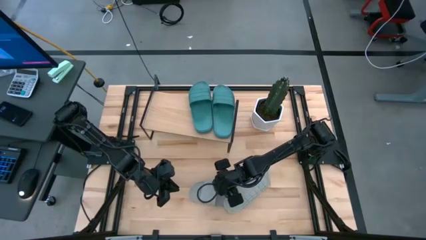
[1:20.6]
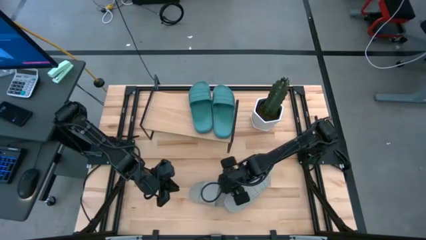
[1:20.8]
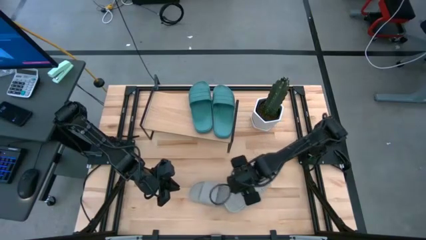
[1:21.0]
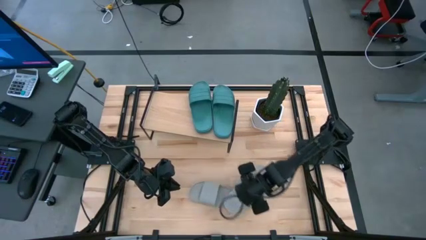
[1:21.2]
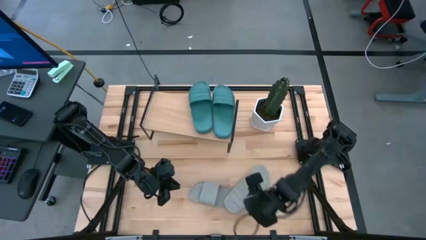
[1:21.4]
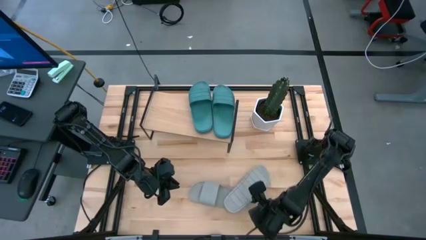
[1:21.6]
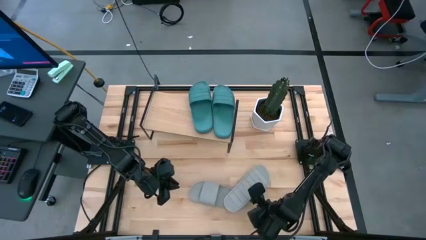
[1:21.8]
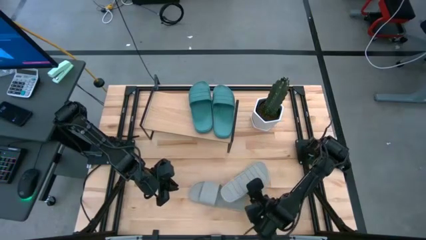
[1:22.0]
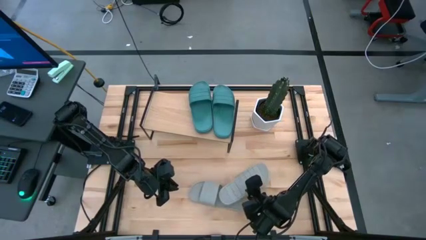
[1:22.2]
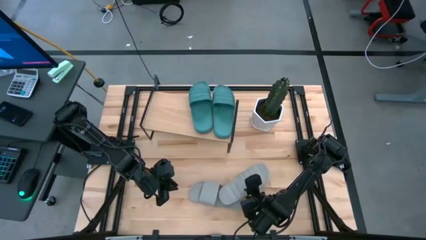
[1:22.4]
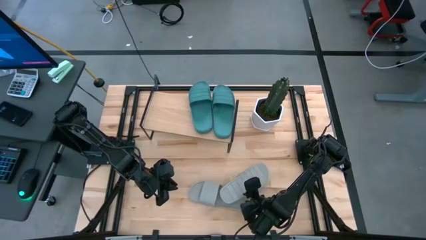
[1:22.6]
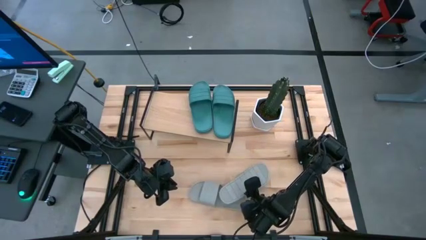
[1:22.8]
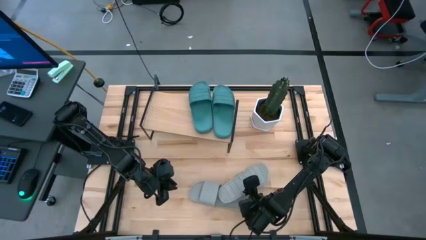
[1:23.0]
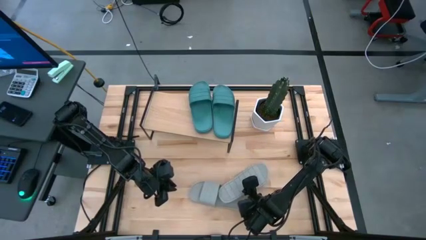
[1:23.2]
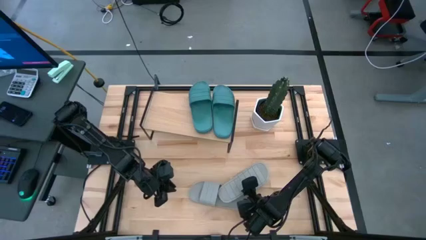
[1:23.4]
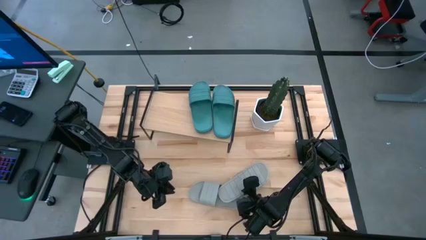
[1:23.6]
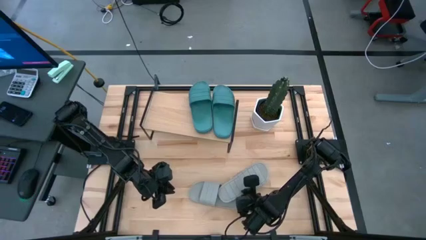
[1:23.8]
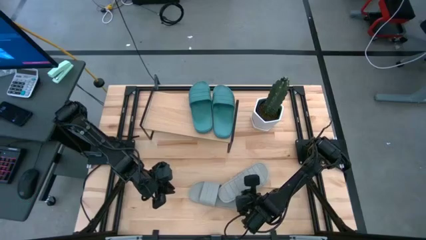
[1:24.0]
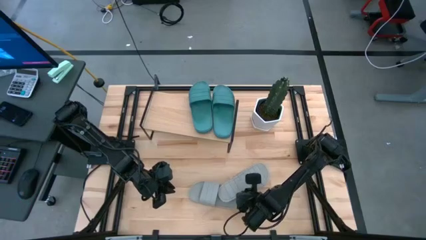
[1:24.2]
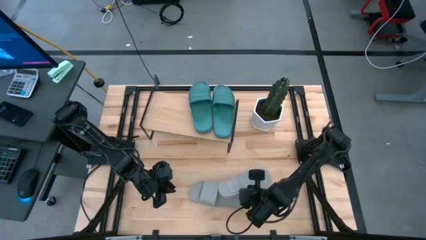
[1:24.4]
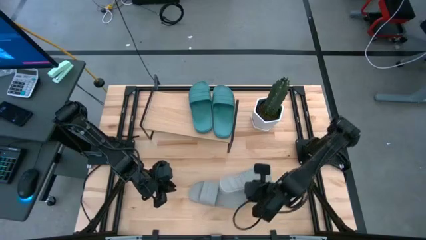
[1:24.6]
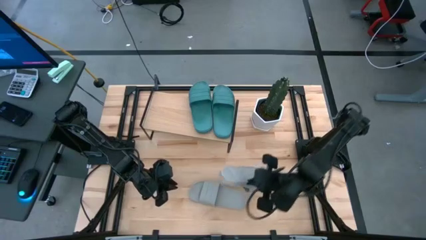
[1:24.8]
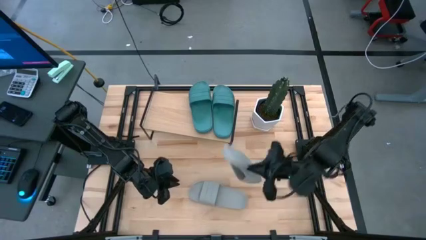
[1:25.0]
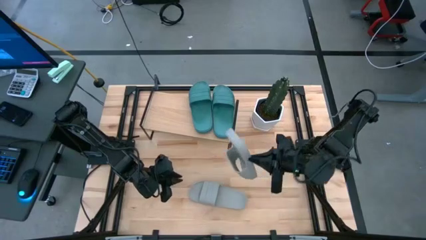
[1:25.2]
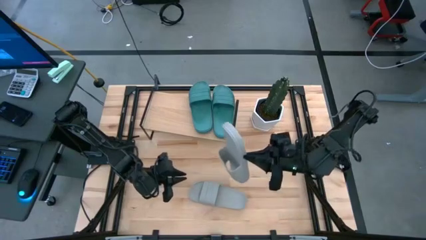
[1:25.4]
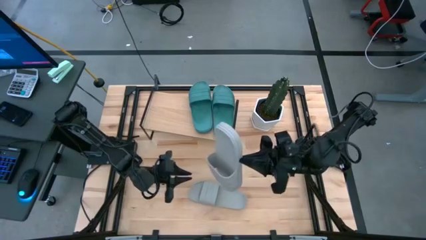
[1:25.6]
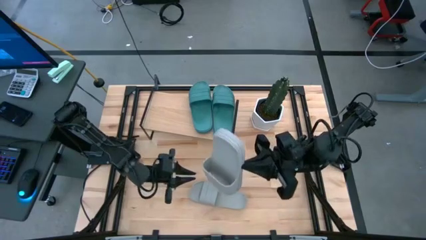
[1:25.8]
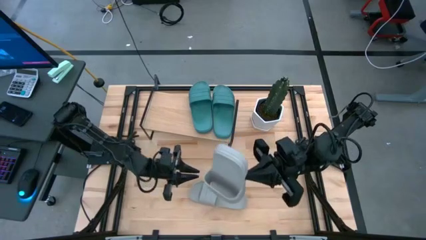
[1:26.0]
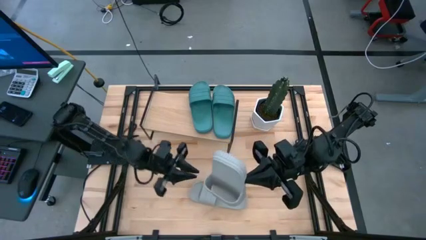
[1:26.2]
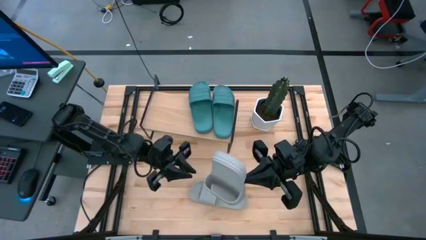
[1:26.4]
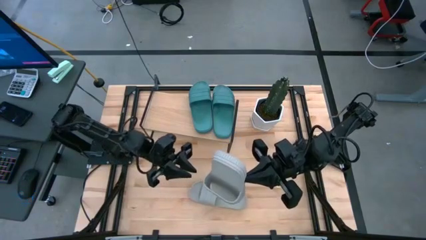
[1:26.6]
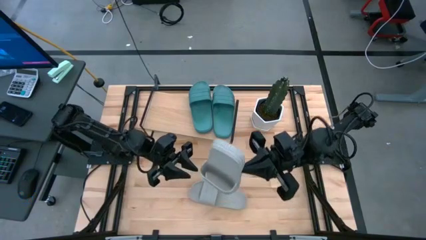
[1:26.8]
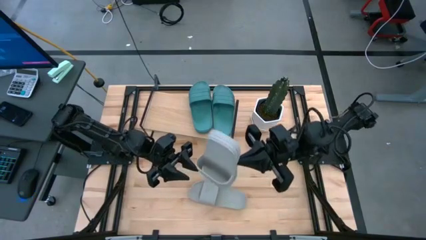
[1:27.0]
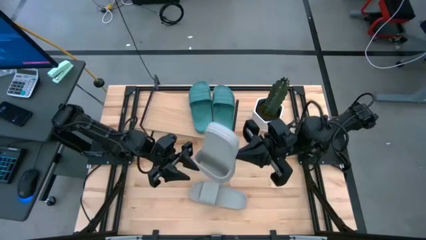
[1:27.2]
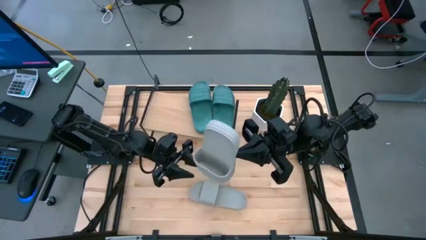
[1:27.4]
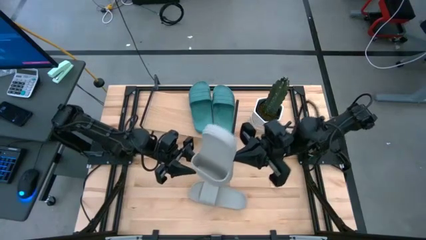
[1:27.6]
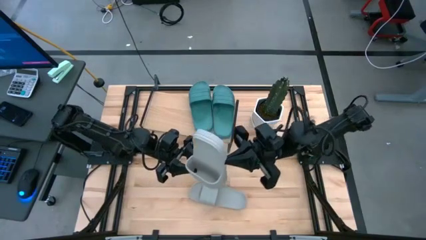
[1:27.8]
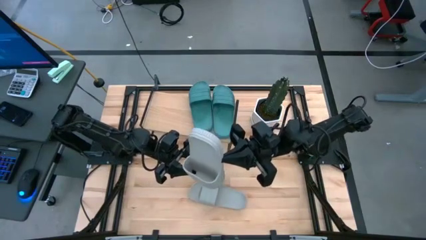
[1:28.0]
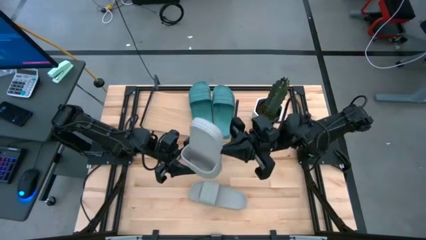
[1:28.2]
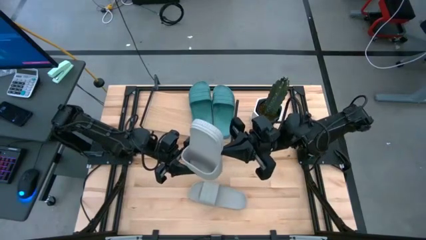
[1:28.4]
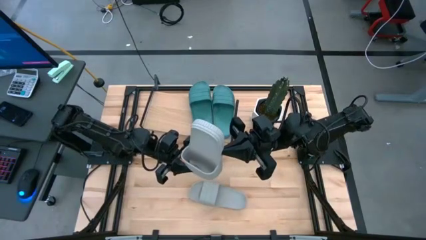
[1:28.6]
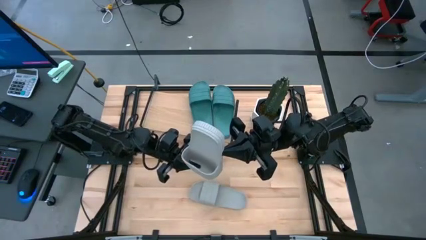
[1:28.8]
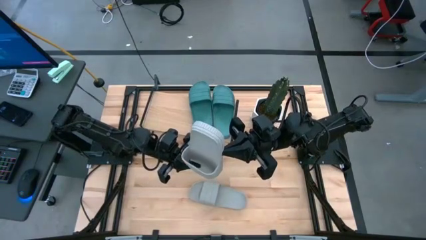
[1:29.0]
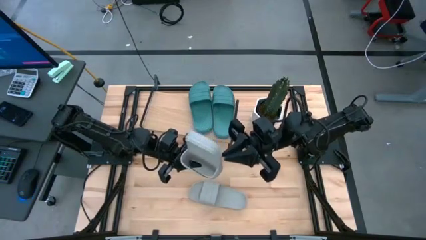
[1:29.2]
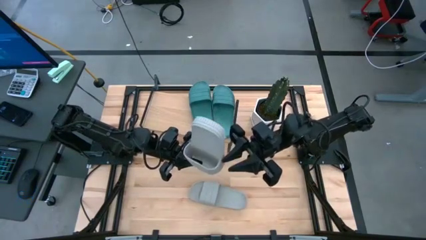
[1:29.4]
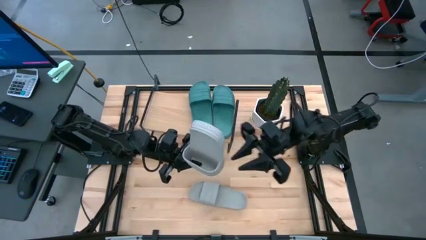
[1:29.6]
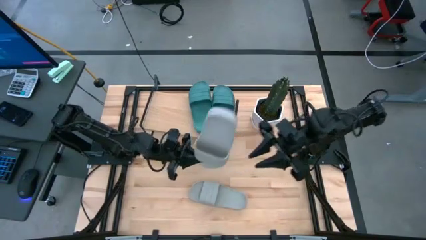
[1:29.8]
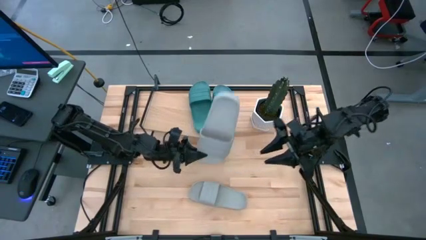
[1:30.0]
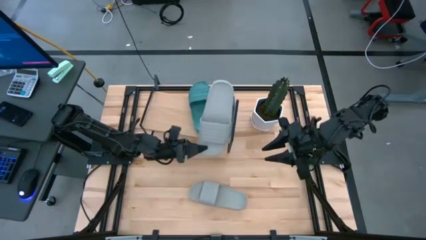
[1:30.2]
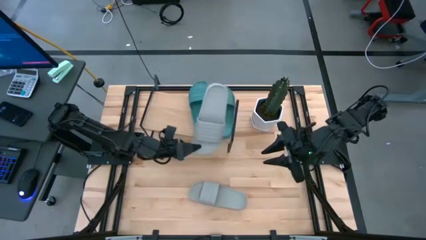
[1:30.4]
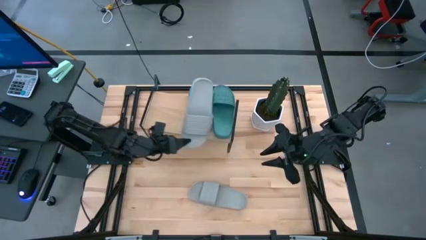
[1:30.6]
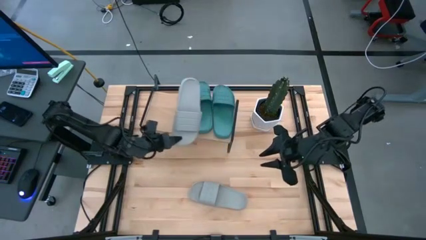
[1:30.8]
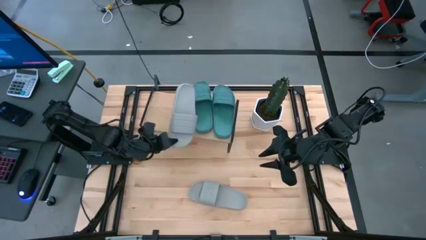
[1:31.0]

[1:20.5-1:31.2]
Task: Pick and place slides into the shelf
Put the gray slide on the shelf

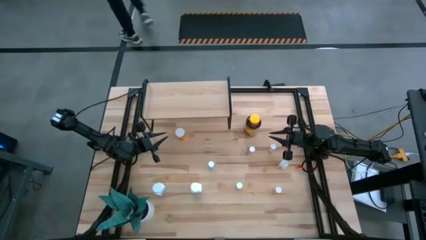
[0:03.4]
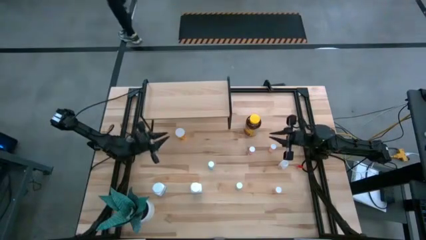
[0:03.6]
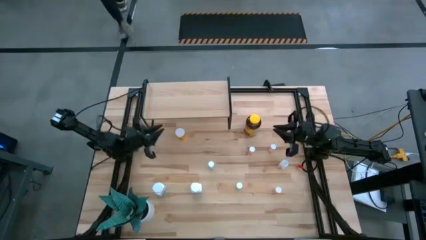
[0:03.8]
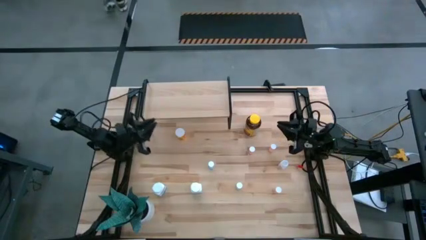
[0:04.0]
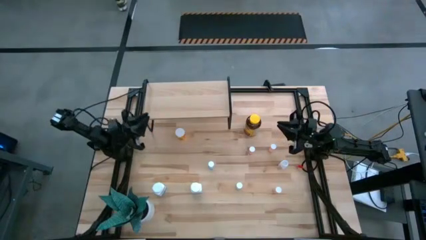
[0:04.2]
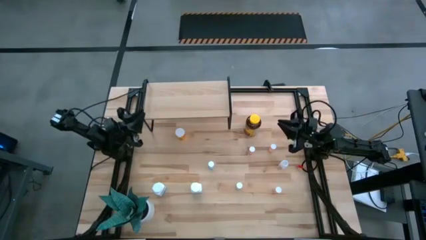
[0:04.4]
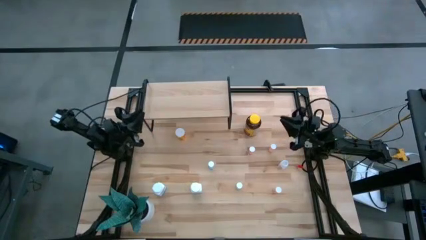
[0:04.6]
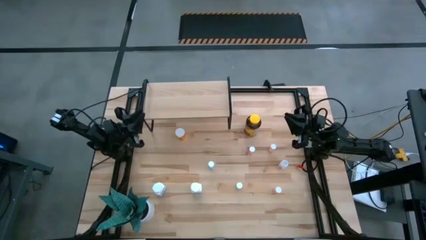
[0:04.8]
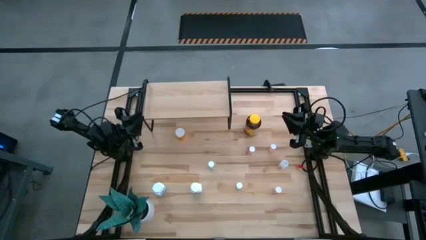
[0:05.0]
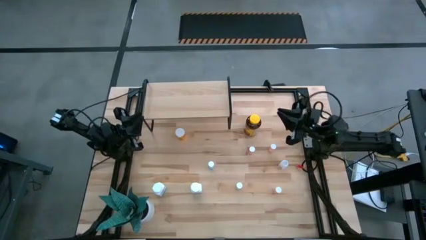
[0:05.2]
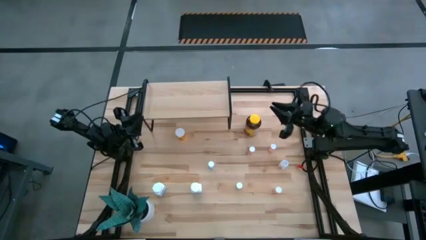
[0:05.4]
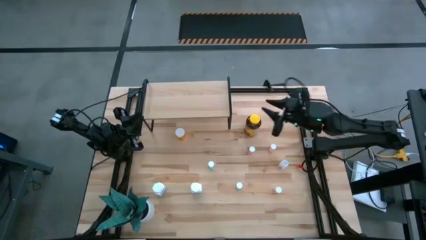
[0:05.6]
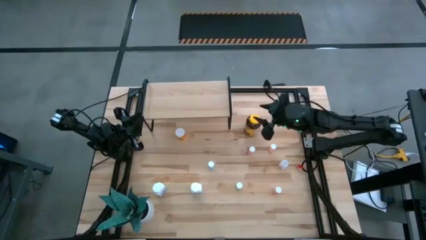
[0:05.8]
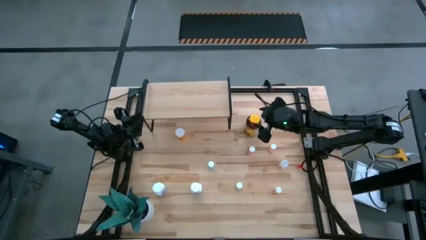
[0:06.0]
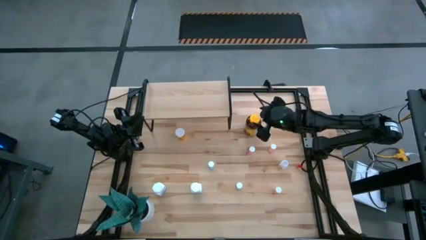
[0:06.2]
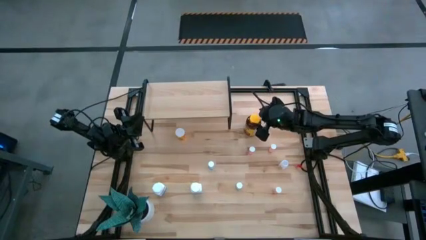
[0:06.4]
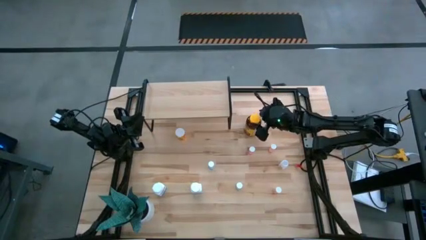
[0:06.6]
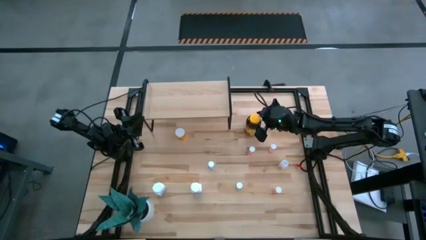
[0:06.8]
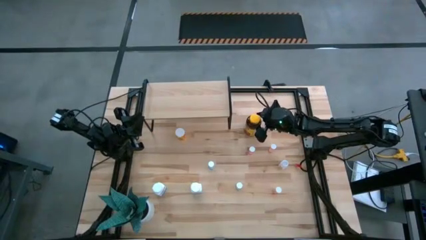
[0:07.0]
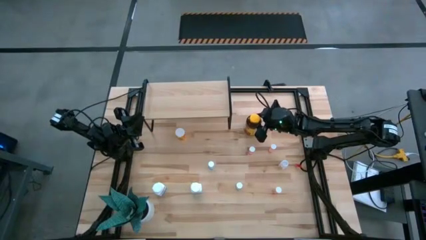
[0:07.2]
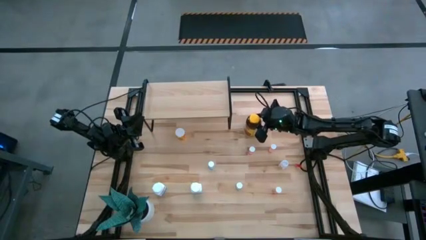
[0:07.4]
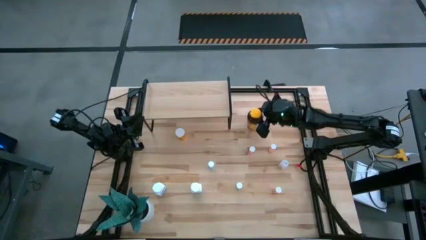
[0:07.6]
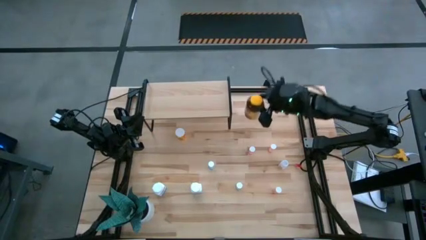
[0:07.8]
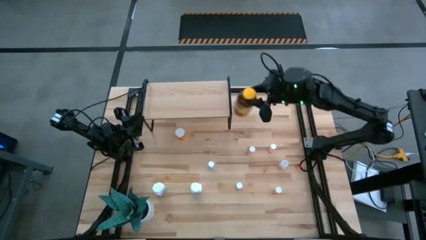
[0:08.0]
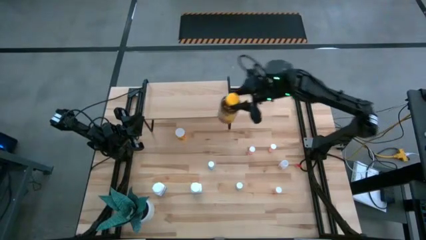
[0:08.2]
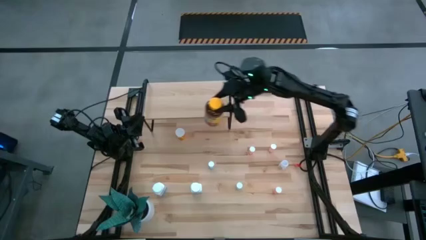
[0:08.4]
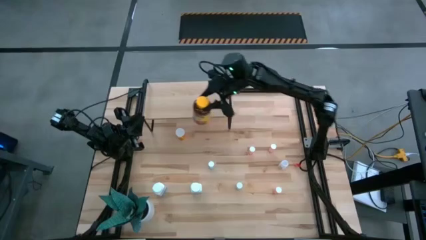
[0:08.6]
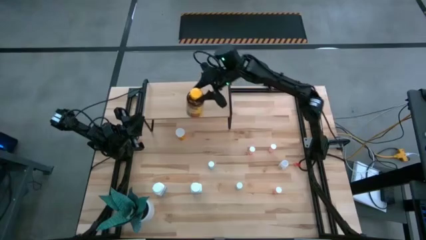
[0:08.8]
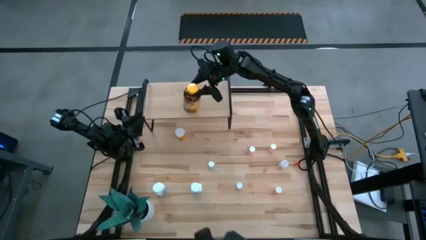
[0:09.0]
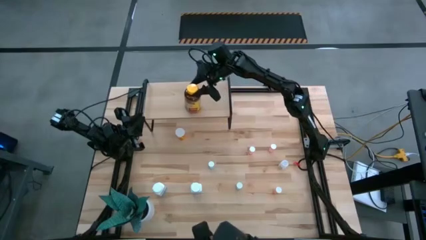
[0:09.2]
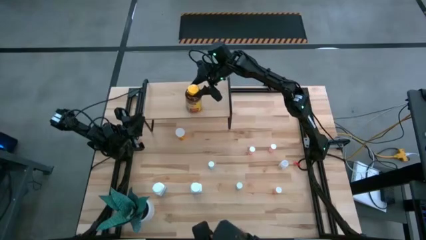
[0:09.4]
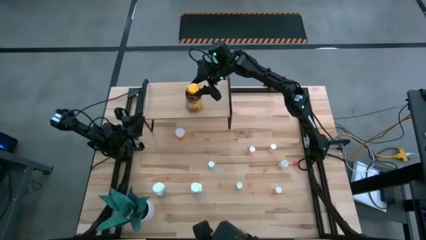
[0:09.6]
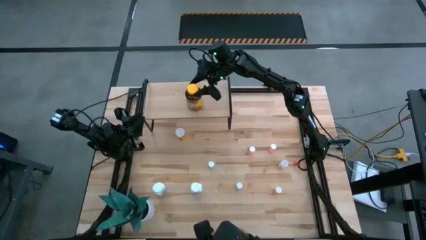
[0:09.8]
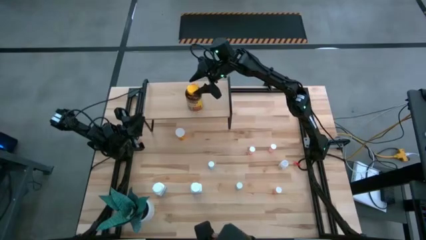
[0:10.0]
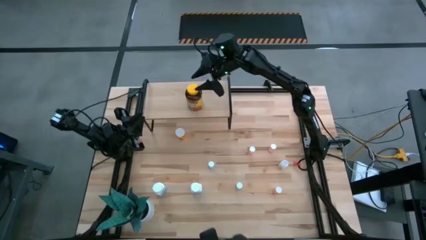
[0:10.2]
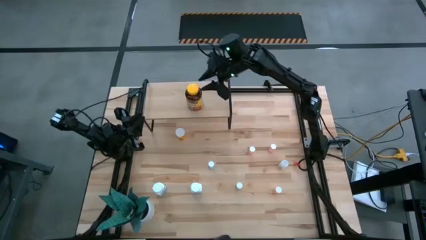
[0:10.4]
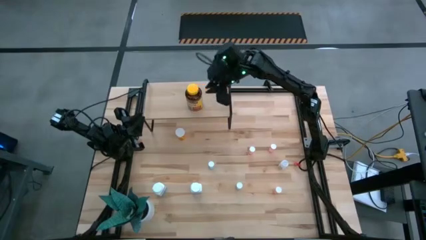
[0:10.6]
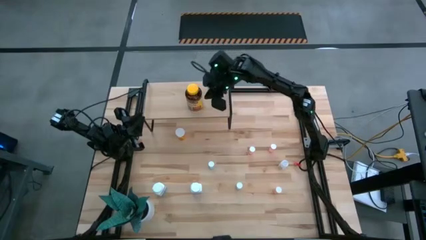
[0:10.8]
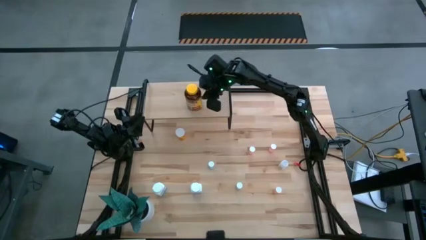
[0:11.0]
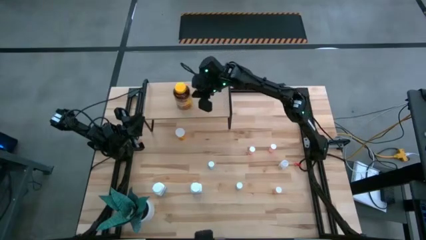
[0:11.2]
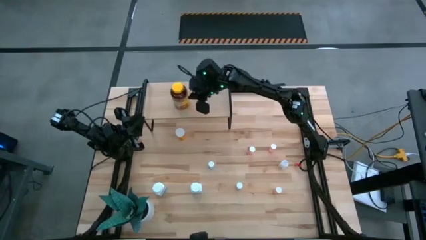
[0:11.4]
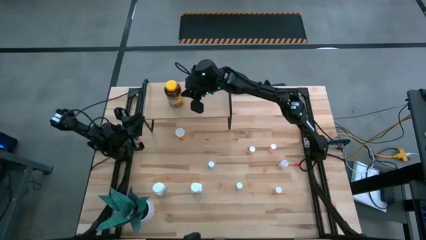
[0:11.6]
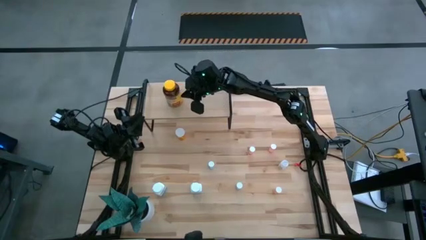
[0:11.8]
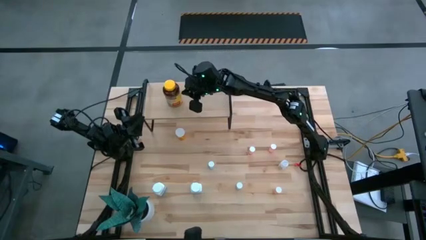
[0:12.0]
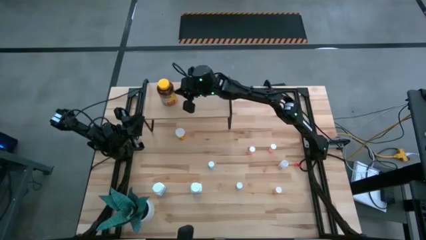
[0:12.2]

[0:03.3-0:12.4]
Task: Pick and place medicine bottles onto shelf by color
Put the yellow pill bottle on the shelf
